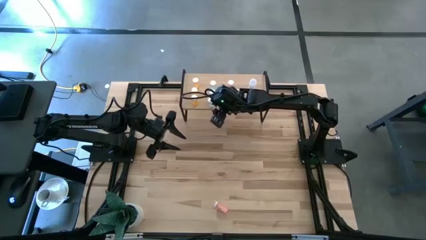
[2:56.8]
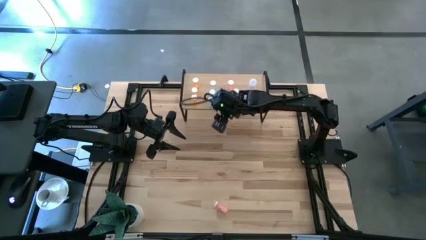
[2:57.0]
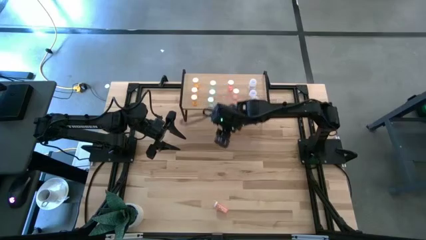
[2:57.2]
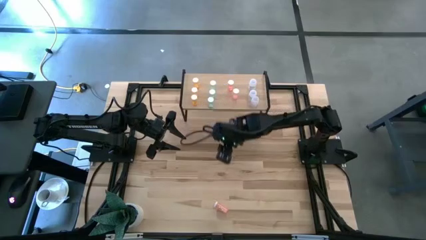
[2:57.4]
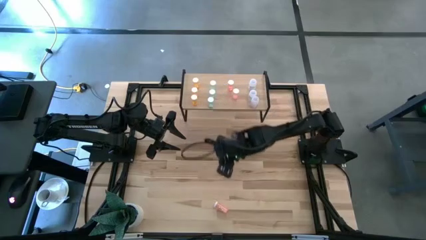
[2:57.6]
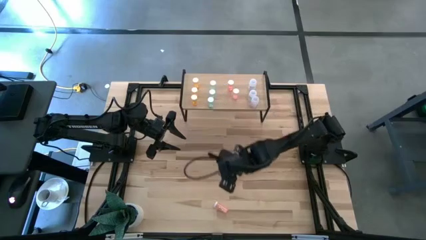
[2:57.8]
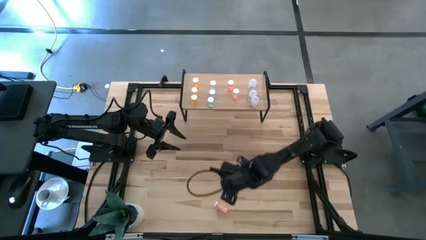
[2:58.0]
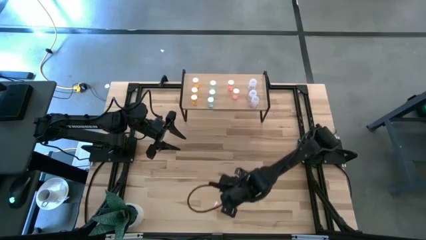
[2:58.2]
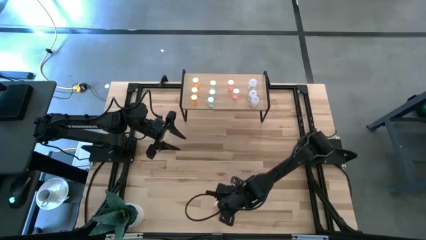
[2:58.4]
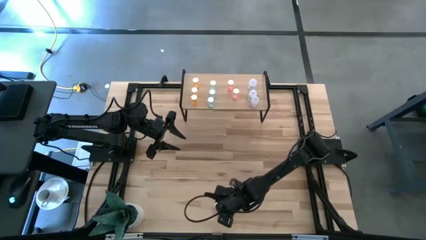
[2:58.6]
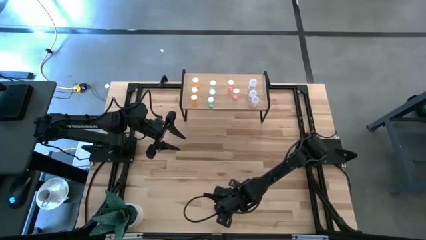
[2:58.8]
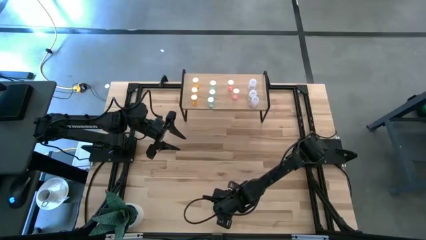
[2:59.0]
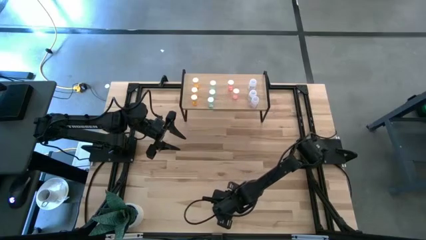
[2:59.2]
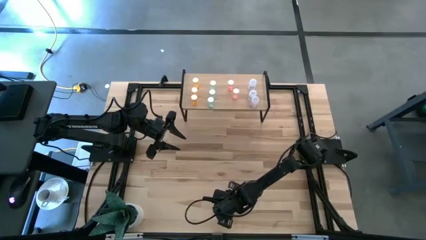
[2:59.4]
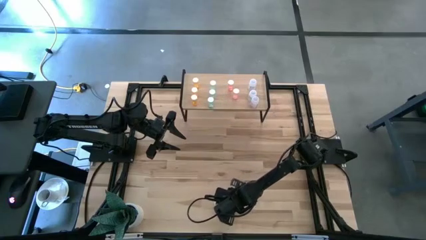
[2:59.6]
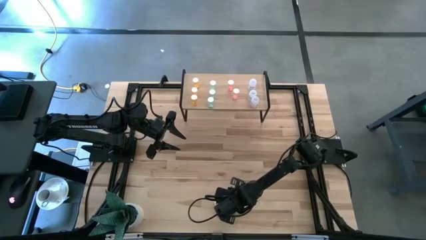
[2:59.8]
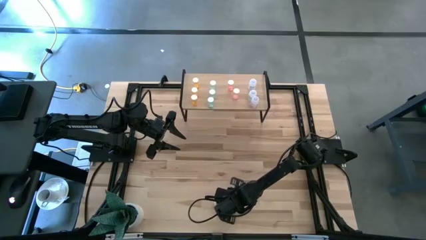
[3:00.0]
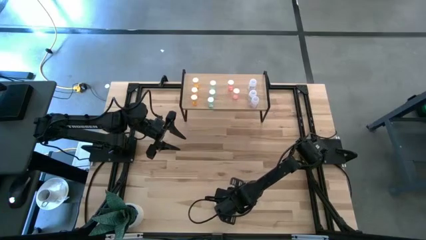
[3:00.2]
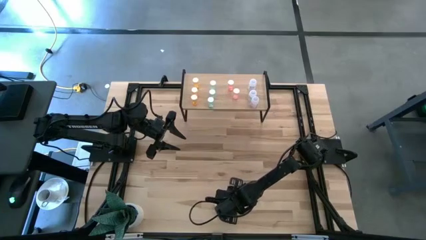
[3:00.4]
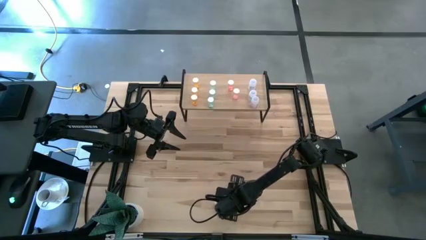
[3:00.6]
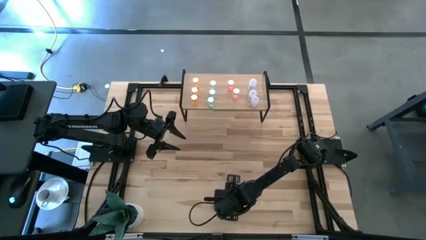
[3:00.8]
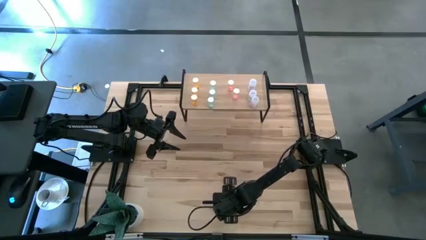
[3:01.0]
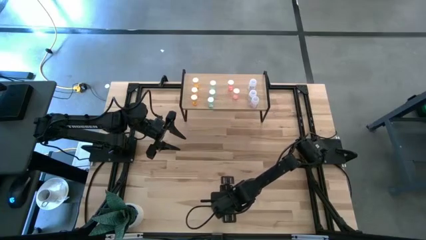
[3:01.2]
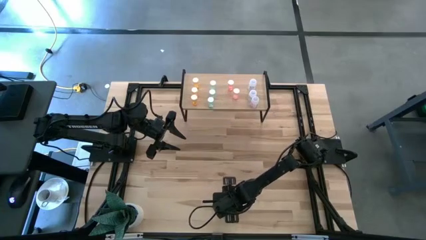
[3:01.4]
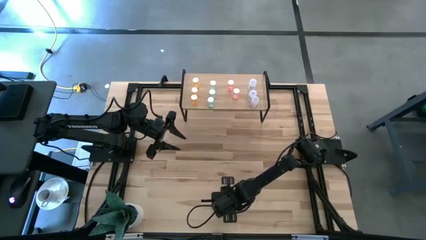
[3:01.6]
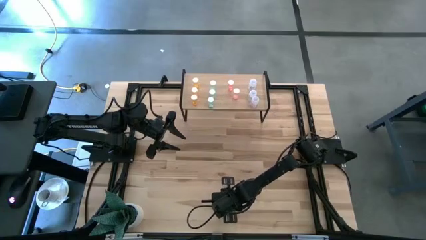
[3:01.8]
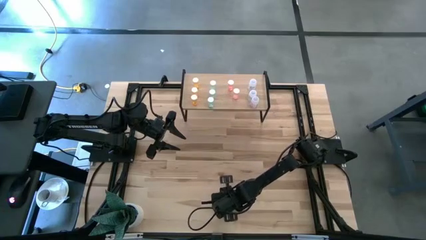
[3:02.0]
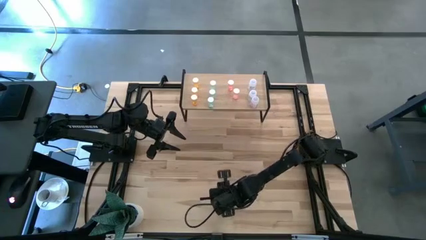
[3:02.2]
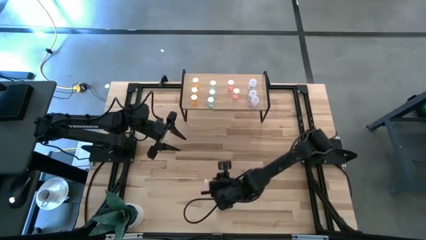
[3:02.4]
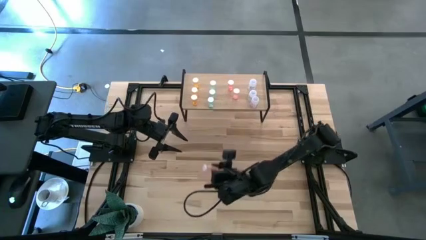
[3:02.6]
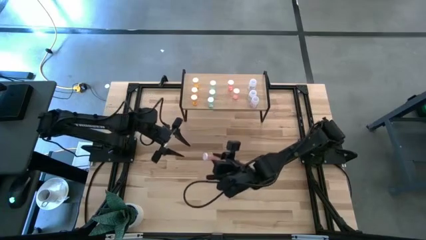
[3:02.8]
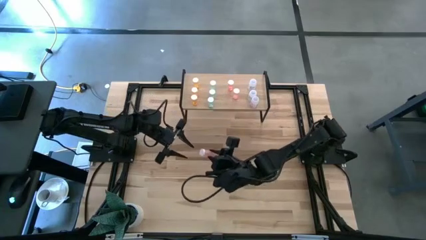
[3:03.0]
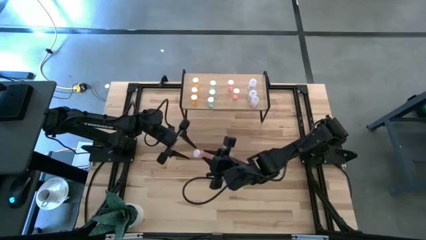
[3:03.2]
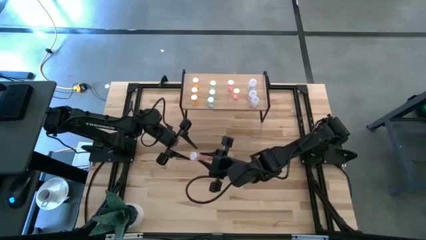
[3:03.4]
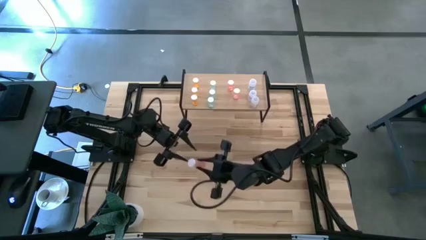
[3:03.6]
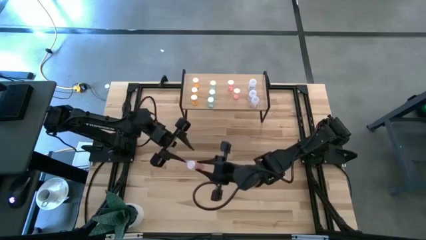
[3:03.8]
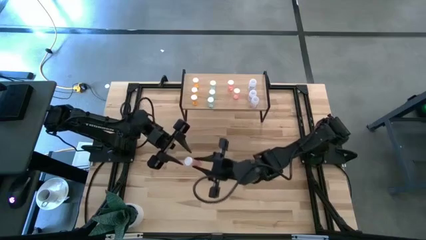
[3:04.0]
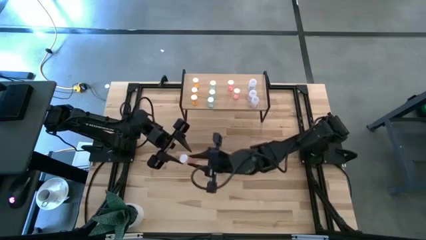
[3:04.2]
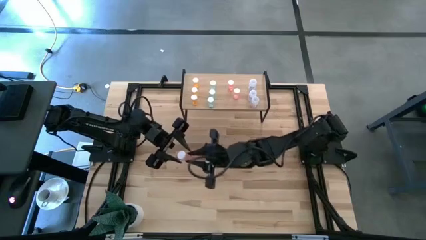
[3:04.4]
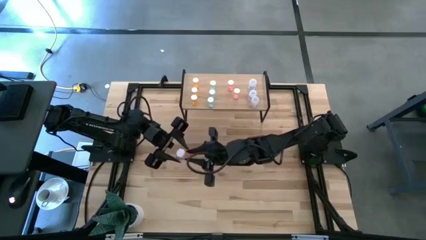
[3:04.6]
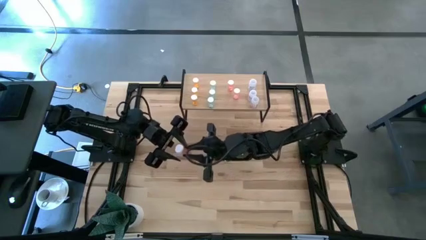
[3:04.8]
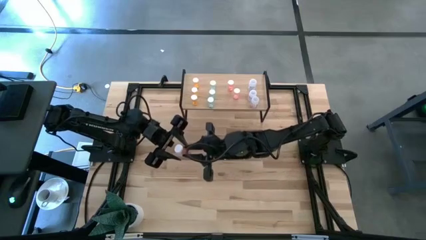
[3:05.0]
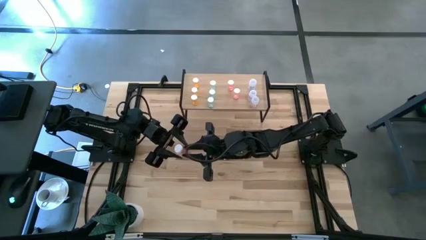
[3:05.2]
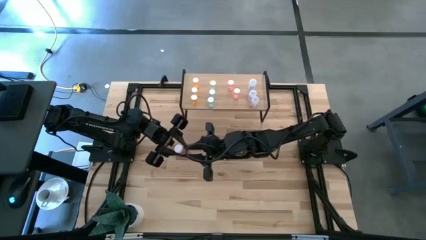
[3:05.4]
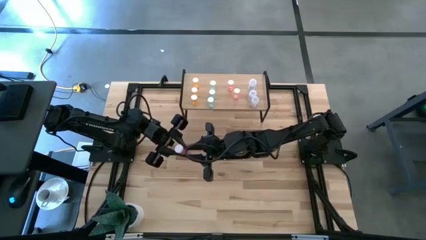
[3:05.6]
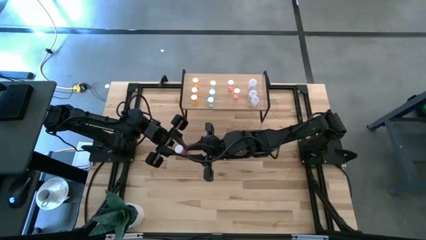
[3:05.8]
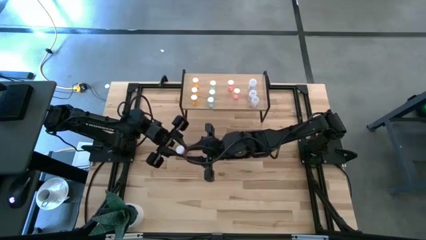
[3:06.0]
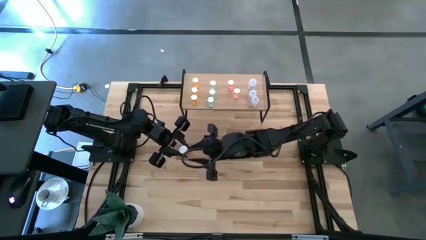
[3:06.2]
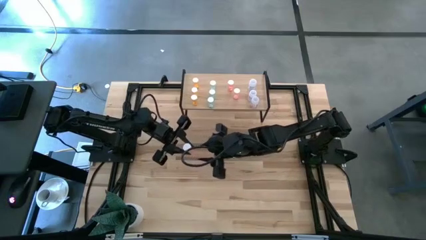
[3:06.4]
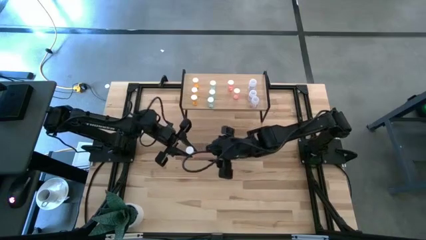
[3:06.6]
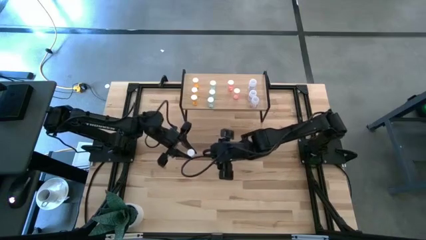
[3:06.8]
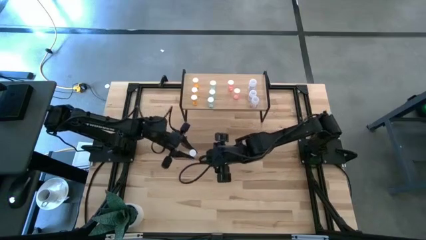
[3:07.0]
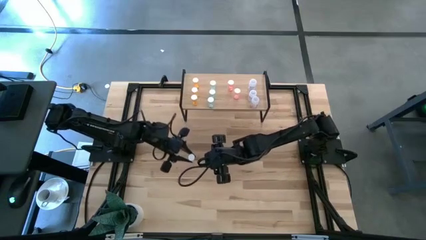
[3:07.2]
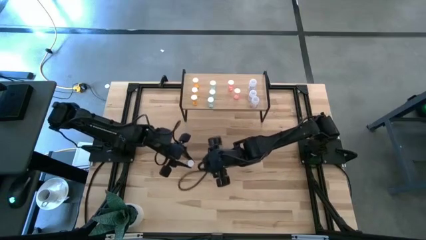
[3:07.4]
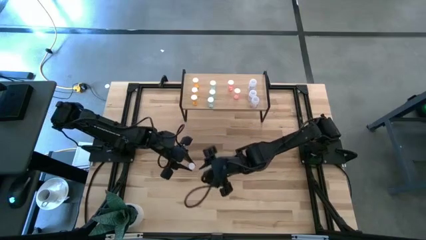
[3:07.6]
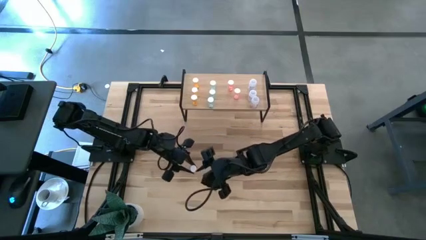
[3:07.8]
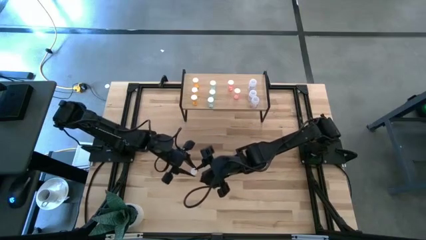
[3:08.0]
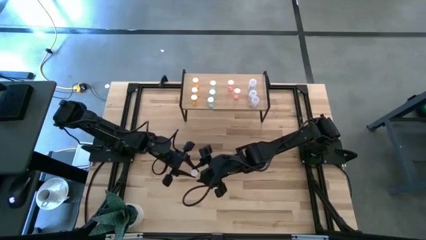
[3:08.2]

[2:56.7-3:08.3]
Task: Pick and place medicine bottles onto shelf by color
Put the pink pill bottle on the shelf aligned with the pink pill bottles

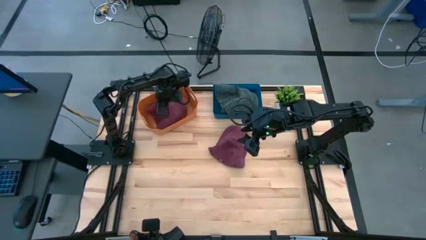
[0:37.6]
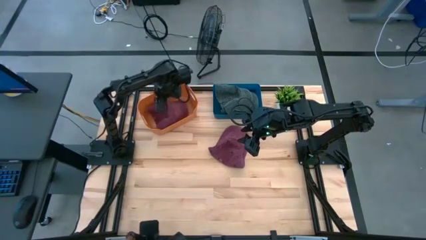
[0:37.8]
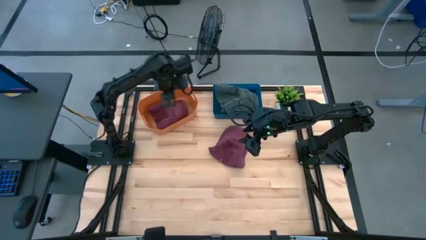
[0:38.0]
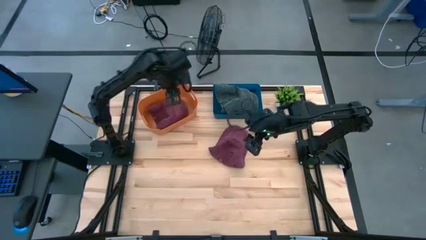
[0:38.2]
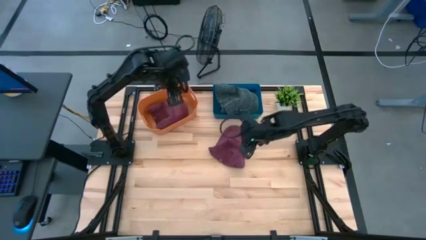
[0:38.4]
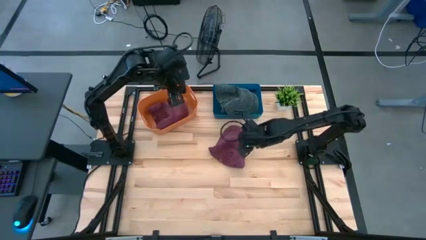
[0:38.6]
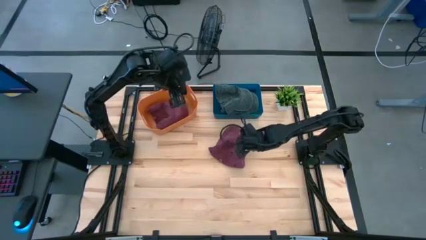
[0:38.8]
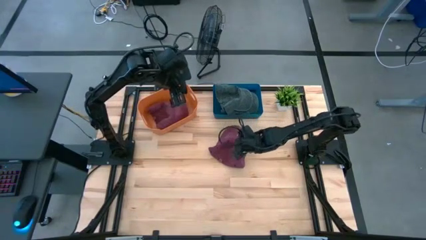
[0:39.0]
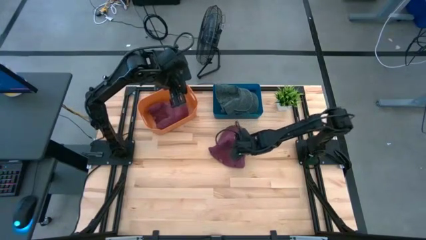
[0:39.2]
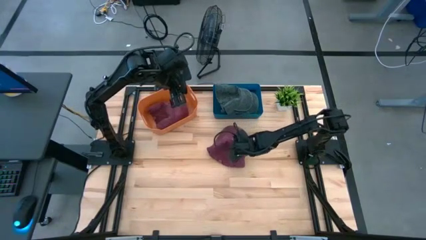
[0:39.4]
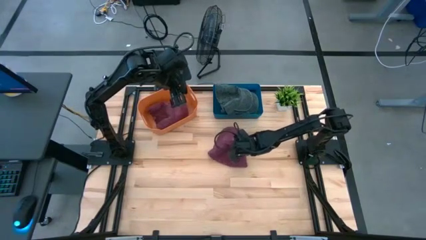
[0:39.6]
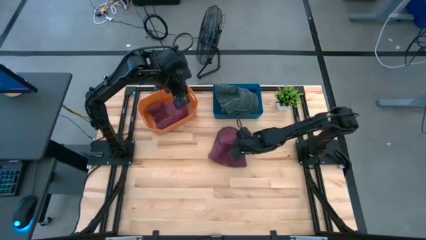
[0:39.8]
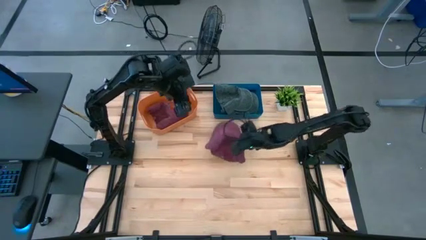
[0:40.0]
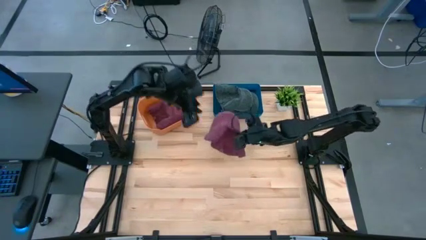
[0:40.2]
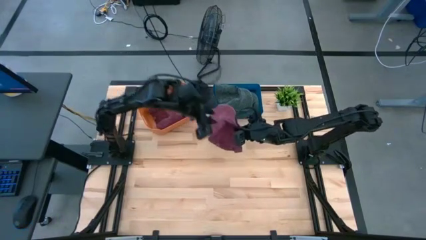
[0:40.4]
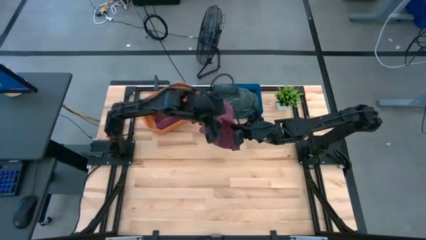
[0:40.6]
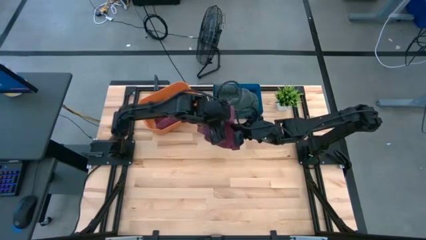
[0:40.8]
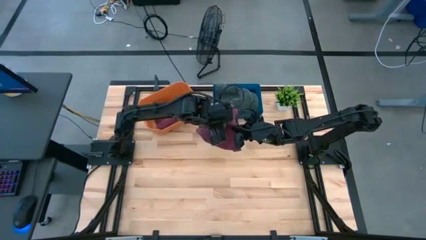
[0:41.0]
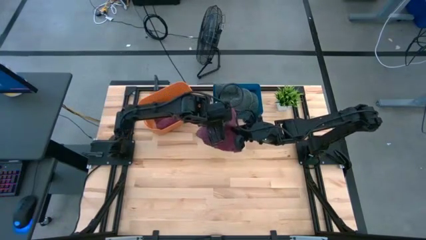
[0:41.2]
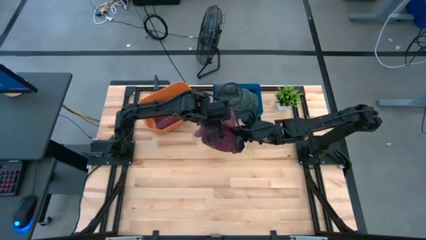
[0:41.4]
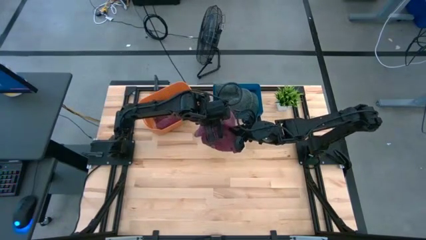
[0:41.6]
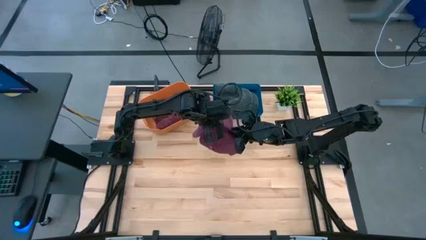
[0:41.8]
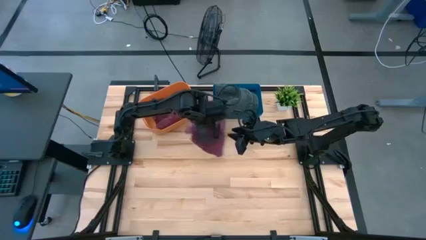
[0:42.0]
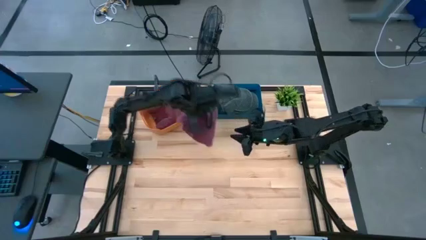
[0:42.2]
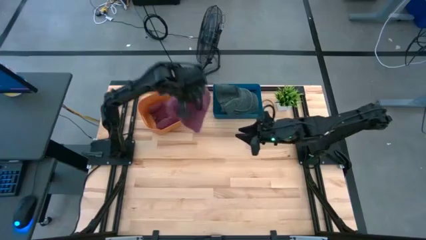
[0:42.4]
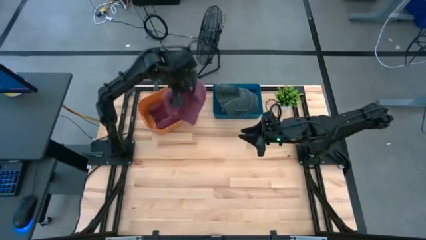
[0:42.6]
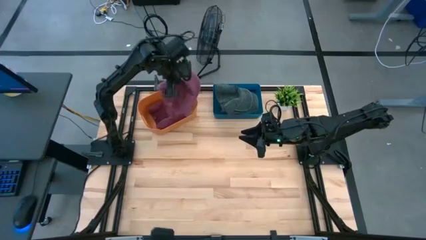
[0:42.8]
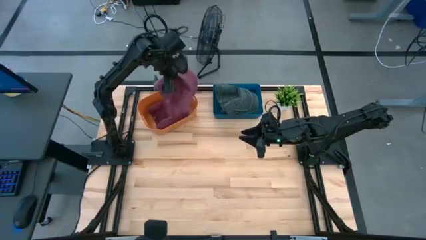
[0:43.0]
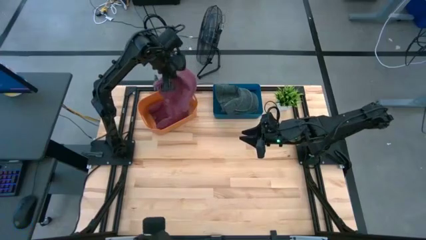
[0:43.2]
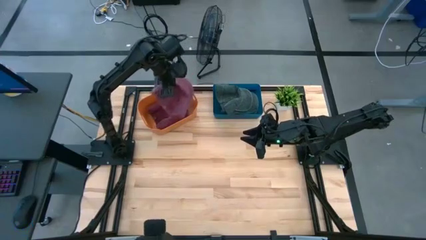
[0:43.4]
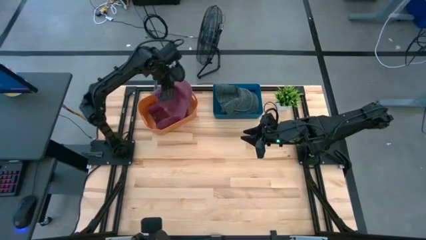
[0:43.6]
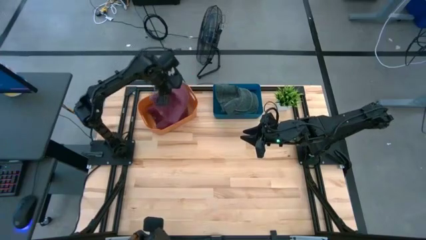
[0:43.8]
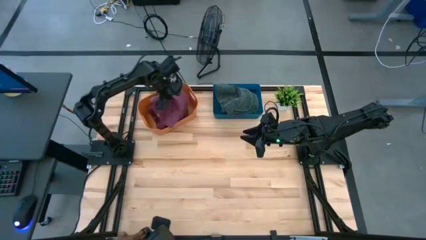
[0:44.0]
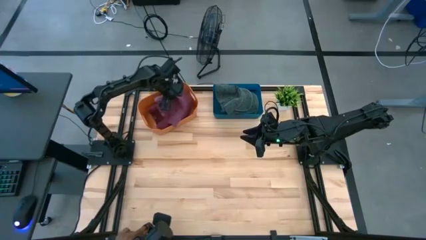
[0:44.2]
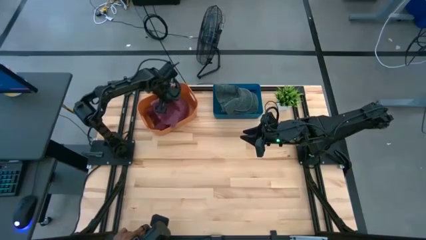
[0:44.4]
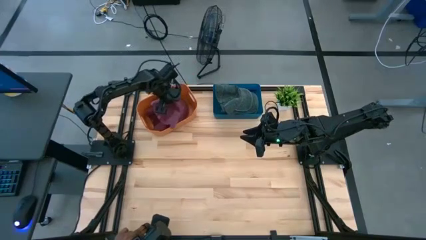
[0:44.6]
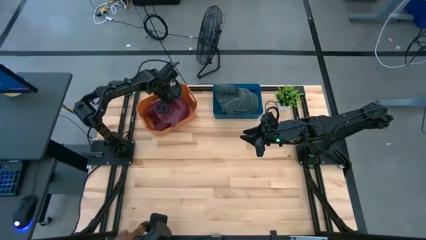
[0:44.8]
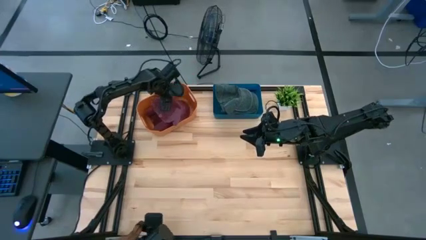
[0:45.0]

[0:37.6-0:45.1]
Task: Pick & Place hat
Put the red cap into the orange bin
